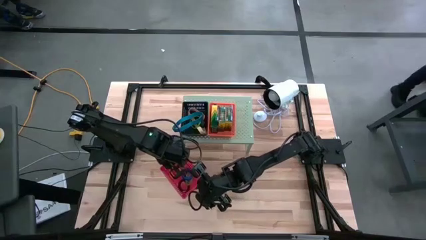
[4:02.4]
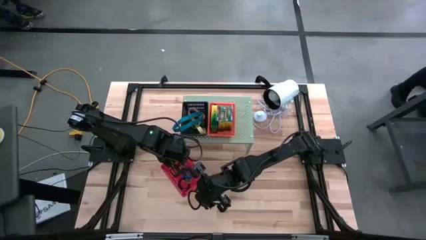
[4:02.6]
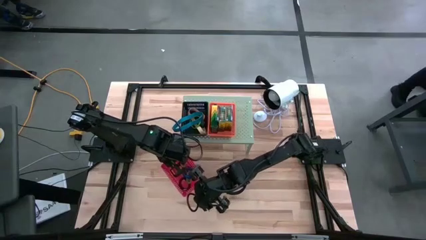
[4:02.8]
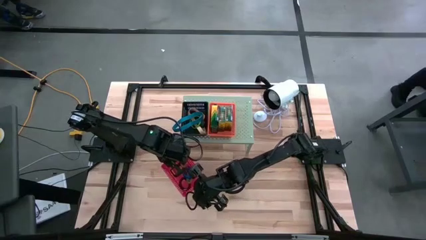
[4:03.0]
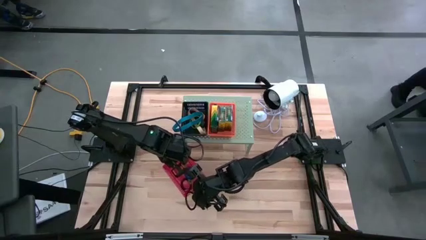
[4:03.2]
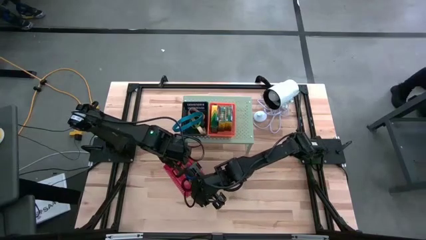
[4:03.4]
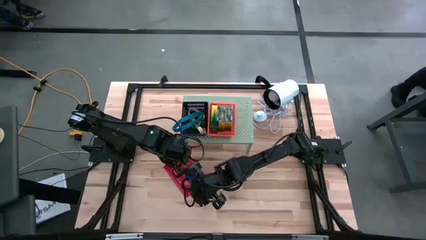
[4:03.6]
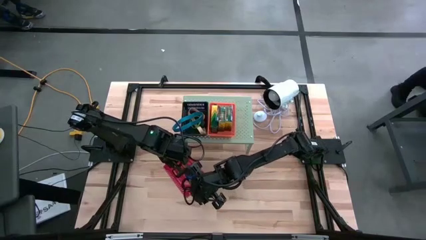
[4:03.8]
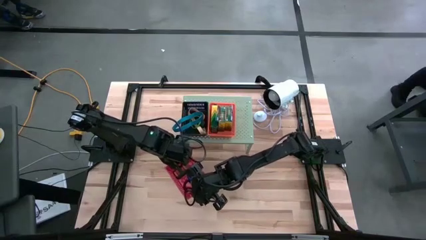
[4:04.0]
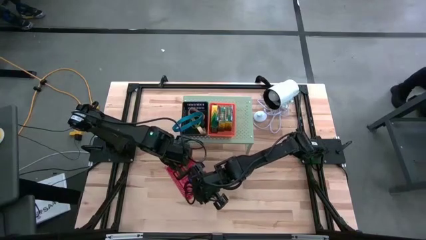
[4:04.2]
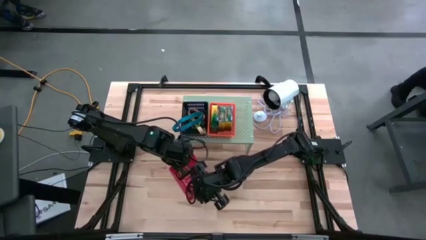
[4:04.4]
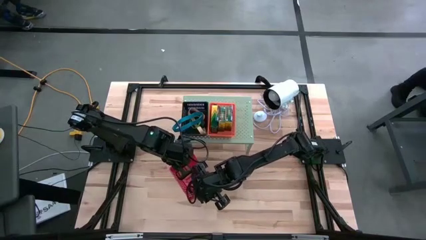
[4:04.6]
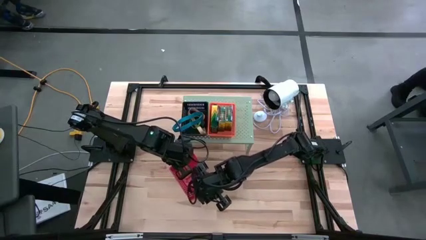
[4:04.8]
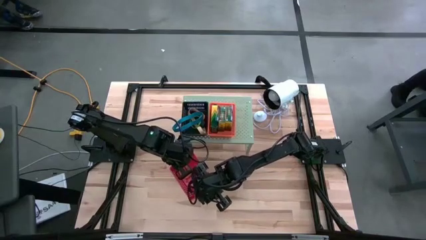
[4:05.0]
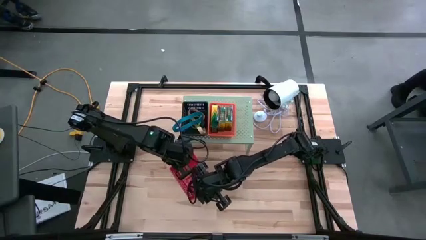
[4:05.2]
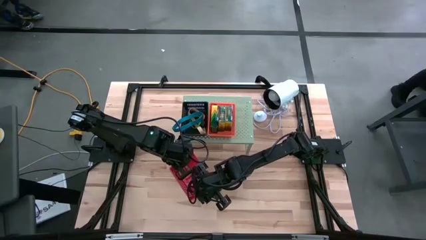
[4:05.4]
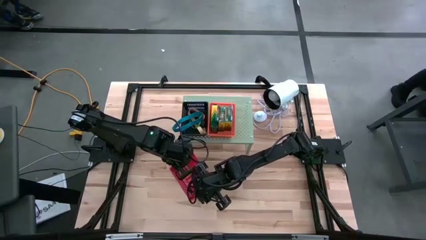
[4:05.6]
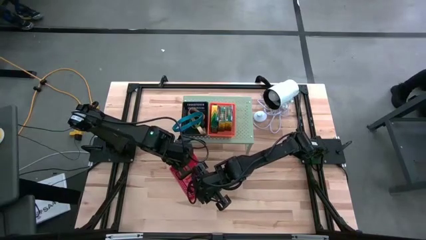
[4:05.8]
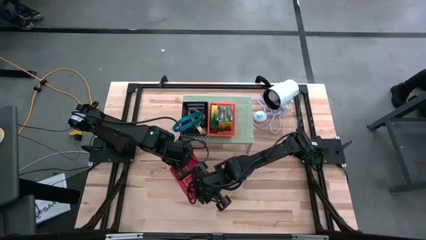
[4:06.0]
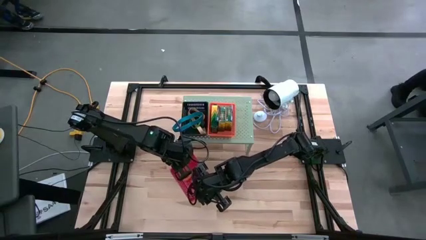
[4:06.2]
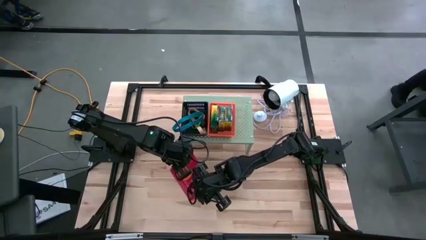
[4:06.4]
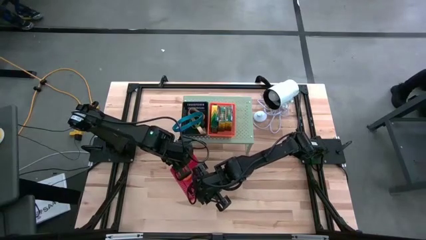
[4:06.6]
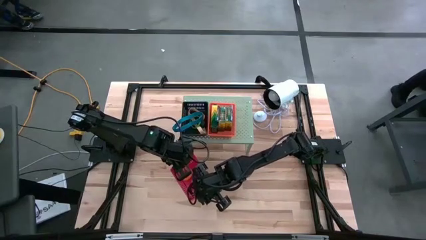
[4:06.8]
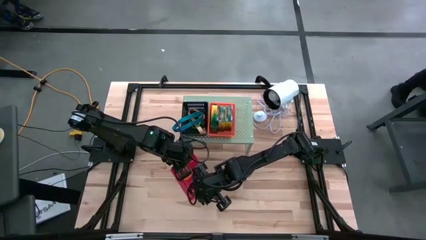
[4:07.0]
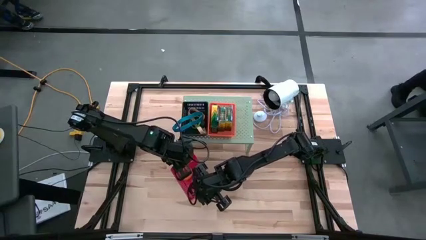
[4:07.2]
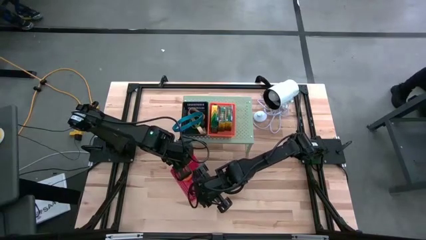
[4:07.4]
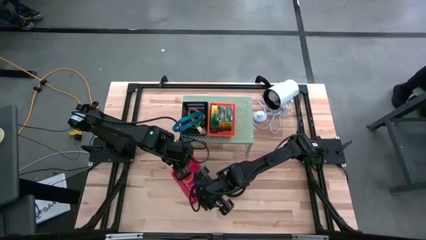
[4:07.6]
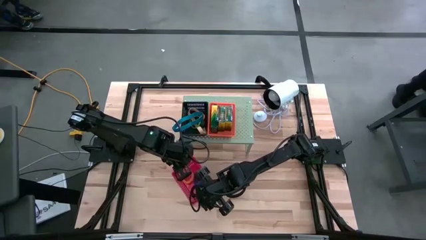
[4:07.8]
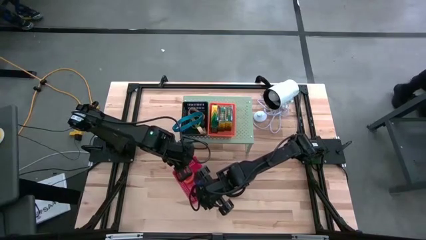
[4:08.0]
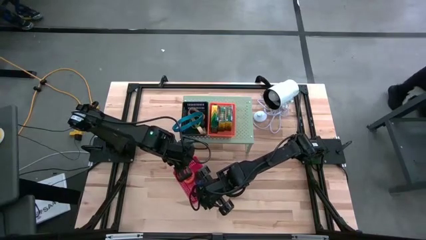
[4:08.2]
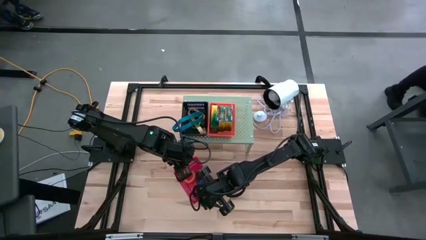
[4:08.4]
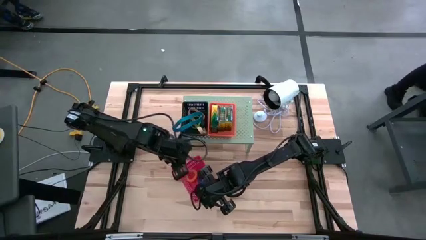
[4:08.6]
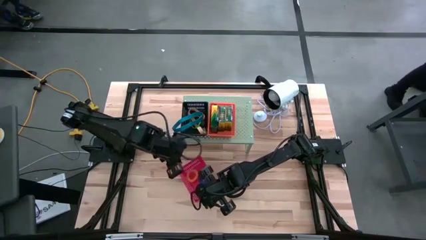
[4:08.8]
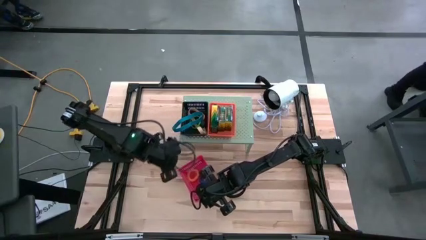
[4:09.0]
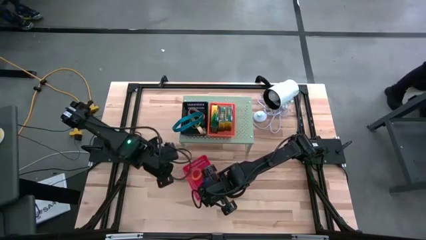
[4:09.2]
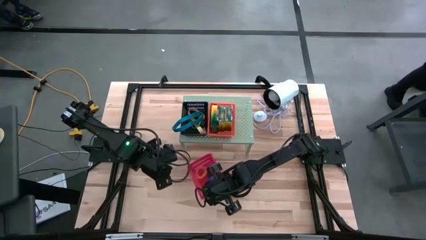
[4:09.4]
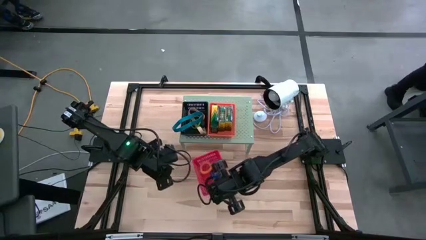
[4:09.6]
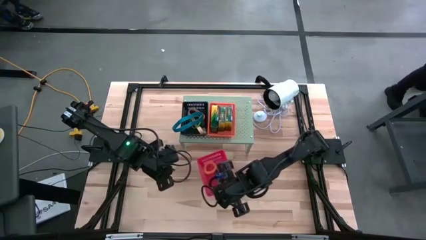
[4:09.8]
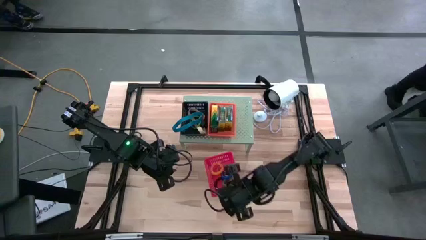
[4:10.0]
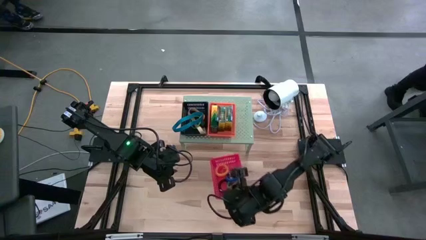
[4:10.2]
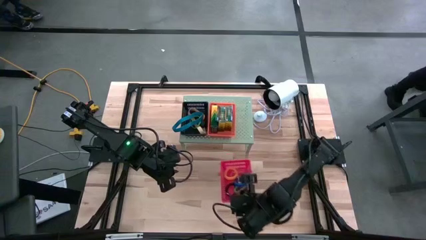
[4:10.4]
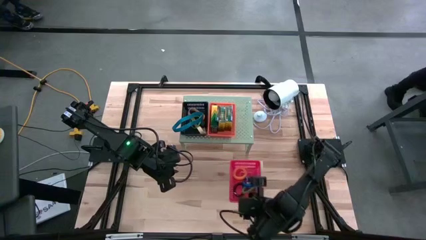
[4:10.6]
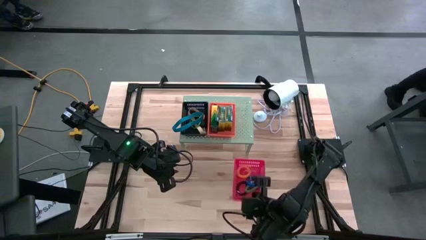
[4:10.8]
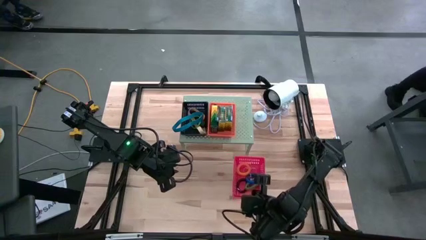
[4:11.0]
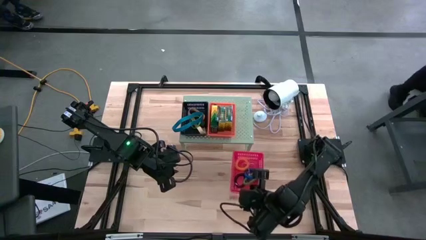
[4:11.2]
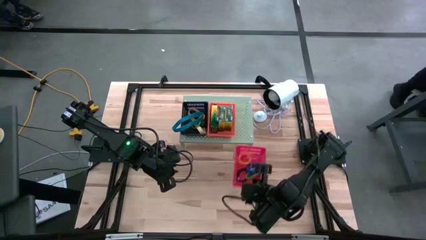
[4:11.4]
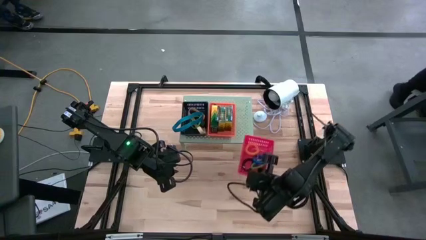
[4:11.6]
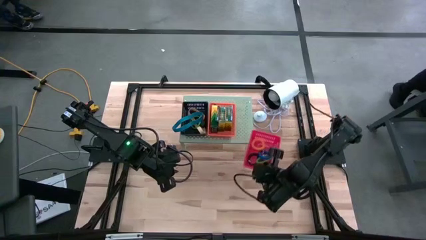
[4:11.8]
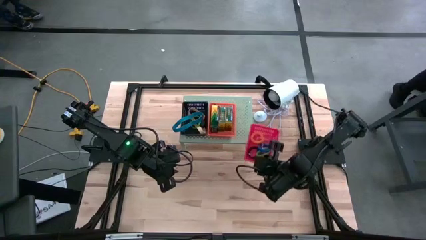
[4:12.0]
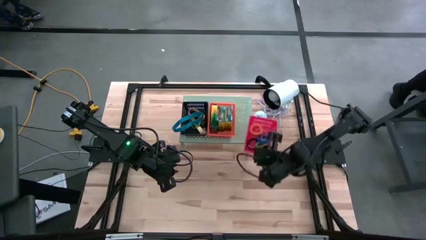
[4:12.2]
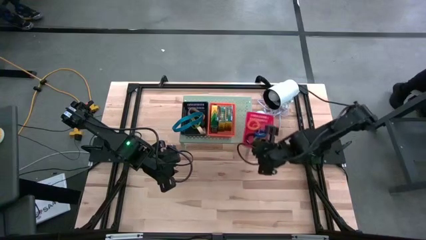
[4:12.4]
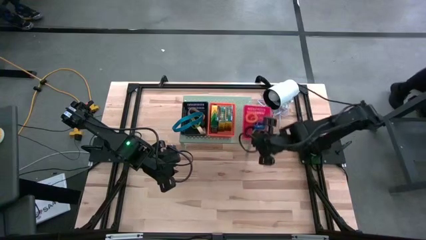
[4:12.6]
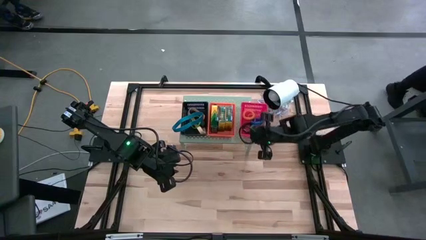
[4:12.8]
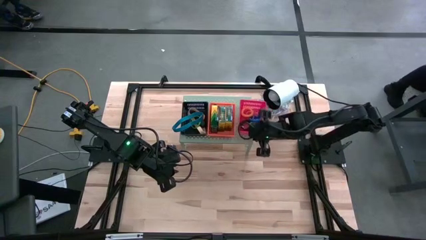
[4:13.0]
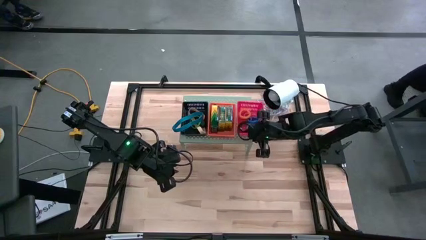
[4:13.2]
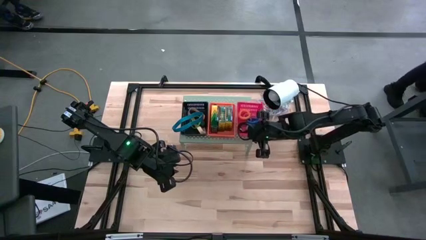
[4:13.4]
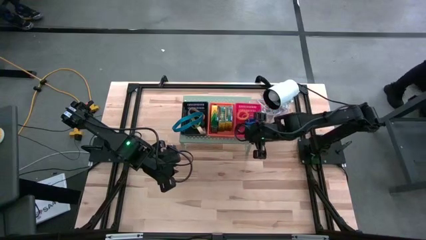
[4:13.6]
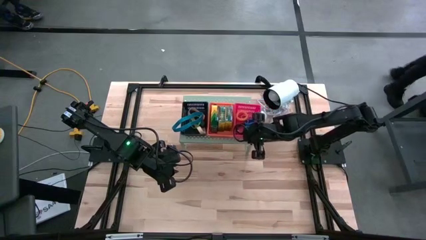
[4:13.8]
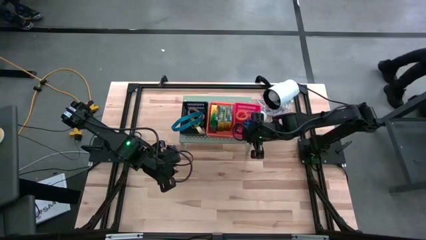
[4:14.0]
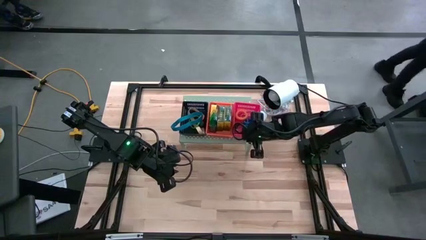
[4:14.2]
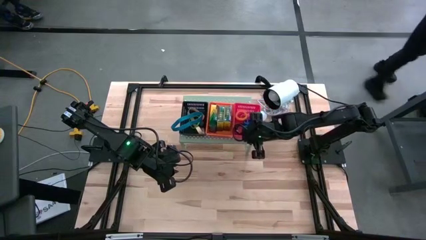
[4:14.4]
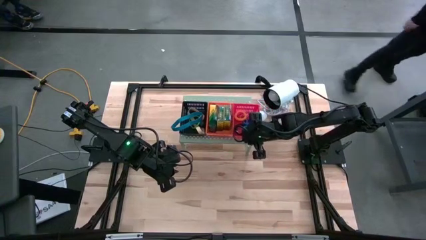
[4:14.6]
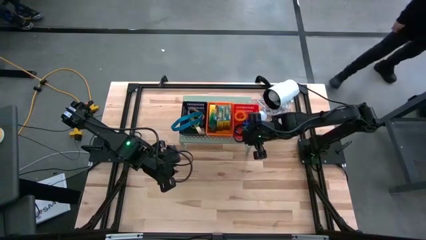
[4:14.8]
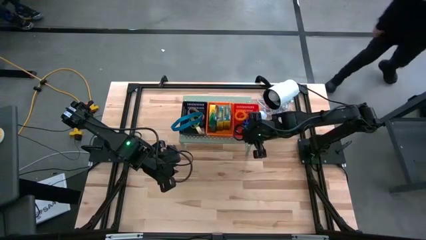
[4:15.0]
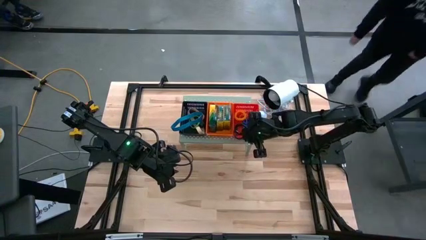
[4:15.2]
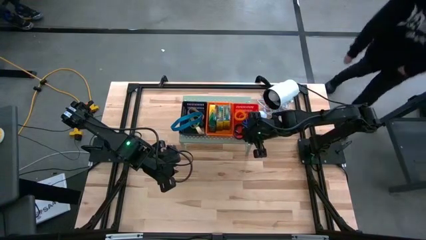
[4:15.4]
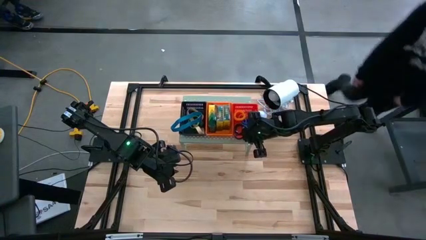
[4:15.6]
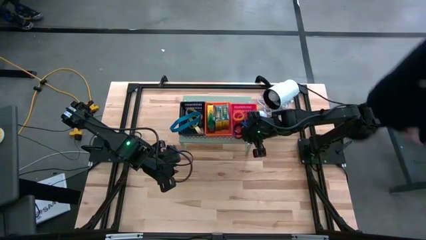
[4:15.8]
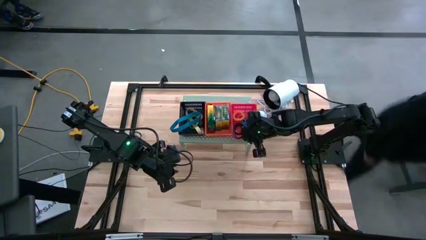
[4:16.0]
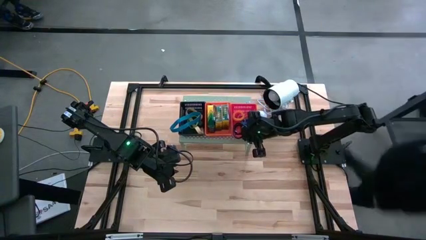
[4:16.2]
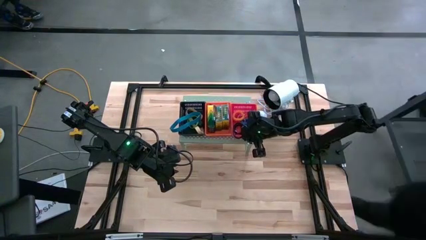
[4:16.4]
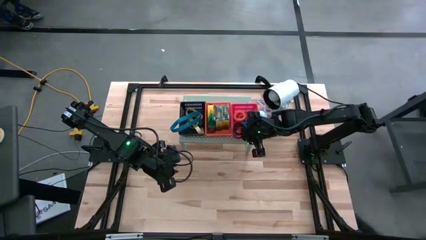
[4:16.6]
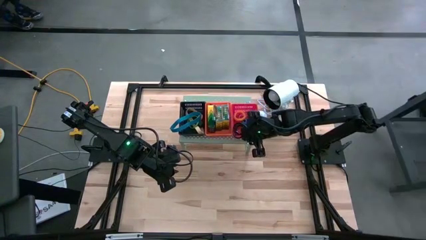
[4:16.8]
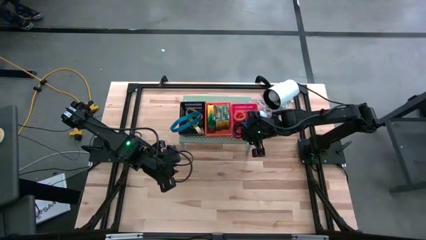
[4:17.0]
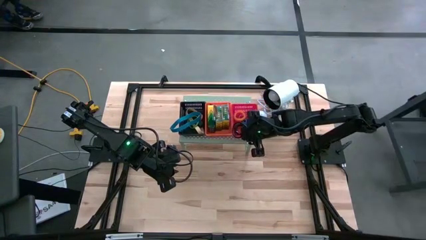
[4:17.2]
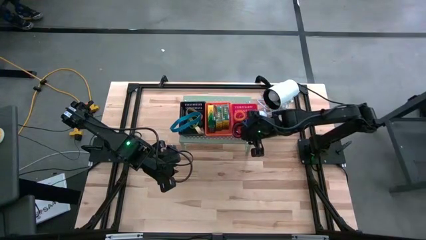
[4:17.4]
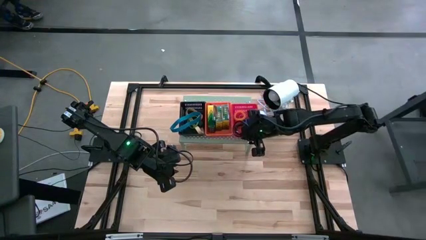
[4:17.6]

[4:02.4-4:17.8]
Task: Pick & Place Office Desk Supplies
Put the red bin with spring keychains on the shelf

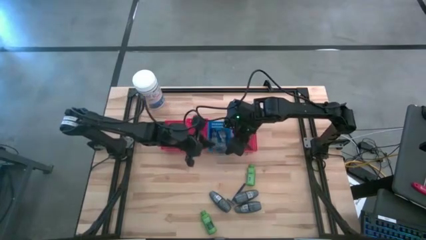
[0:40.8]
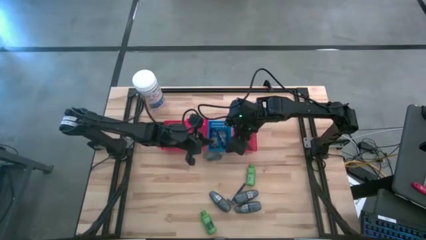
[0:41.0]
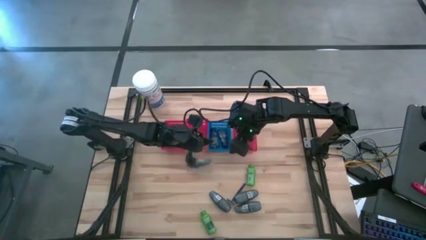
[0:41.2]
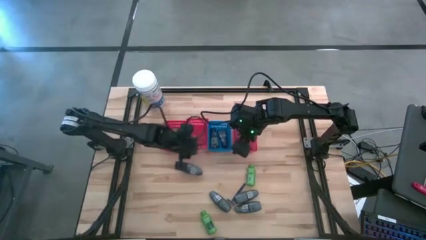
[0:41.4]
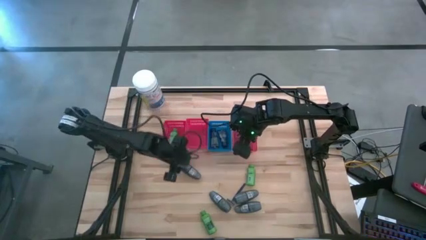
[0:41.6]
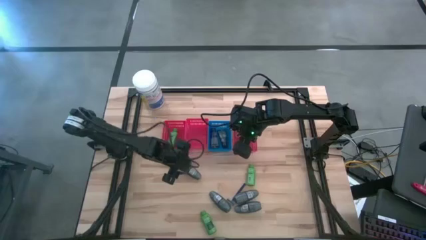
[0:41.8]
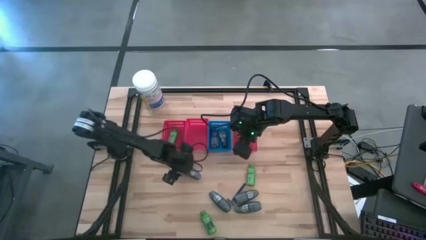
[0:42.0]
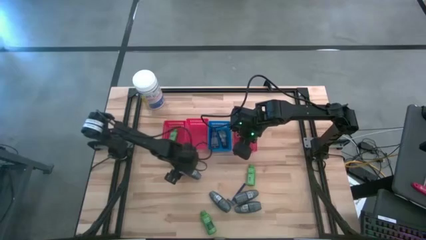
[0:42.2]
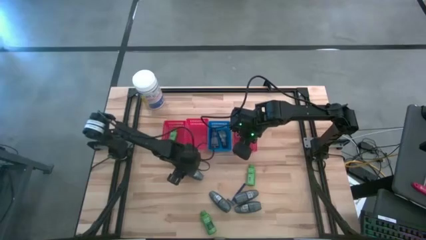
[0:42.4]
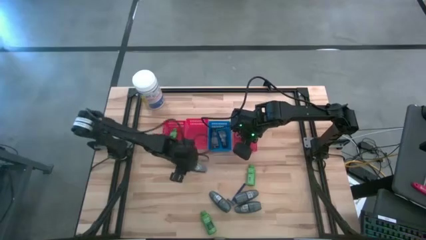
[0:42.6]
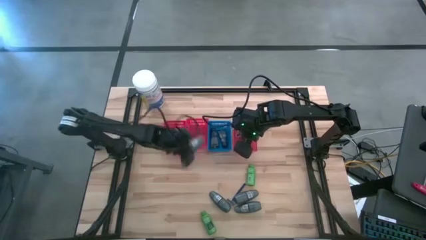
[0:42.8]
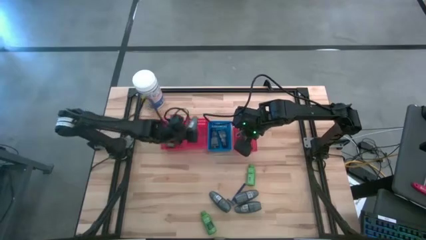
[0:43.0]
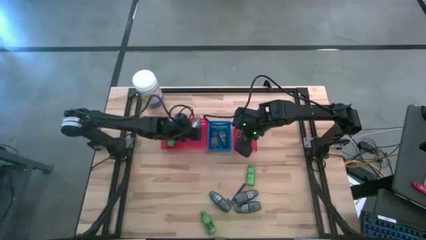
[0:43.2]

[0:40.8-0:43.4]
Task: Pick & Place Travel size toiletries
Put the gray deodorant into the middle red bin
